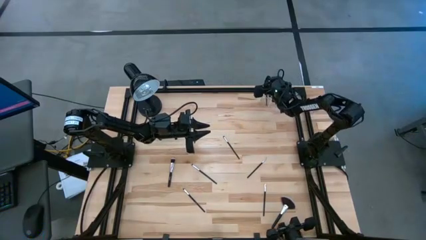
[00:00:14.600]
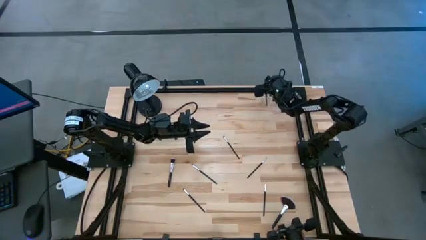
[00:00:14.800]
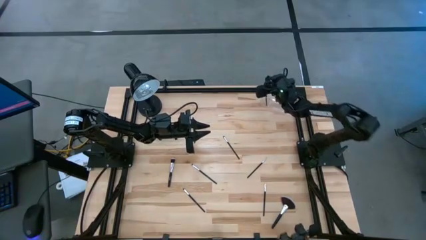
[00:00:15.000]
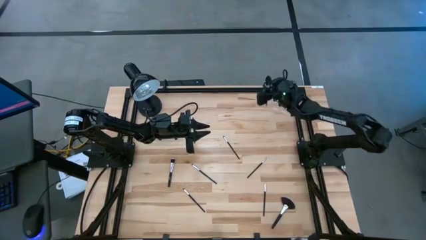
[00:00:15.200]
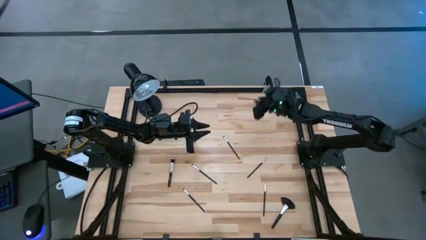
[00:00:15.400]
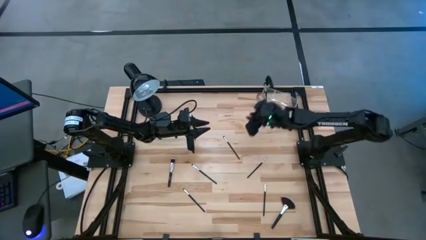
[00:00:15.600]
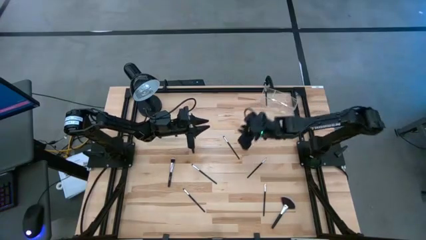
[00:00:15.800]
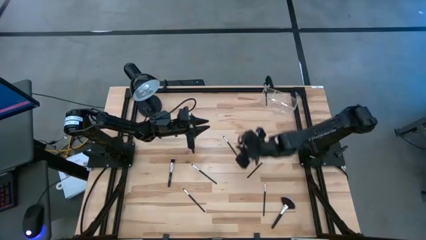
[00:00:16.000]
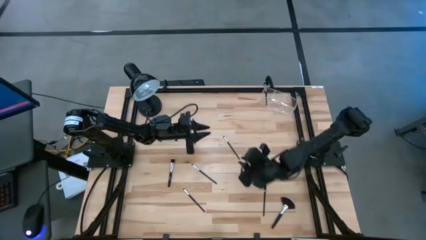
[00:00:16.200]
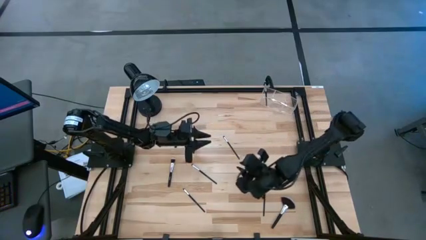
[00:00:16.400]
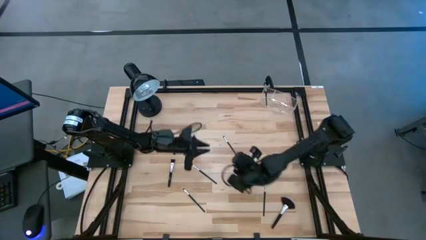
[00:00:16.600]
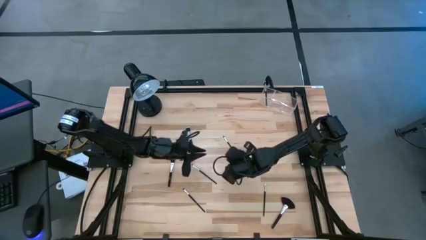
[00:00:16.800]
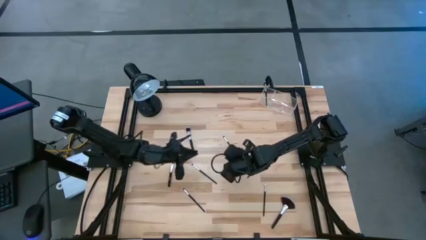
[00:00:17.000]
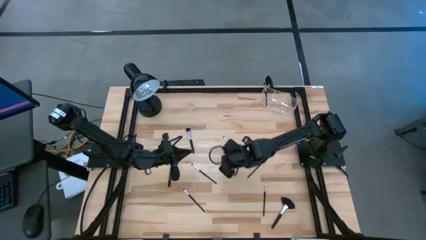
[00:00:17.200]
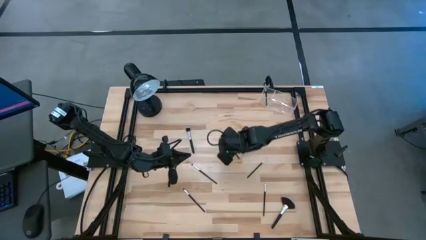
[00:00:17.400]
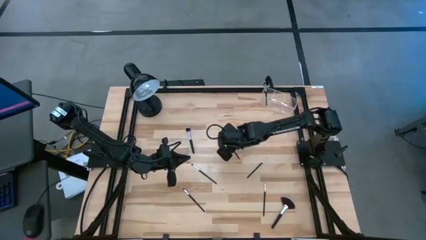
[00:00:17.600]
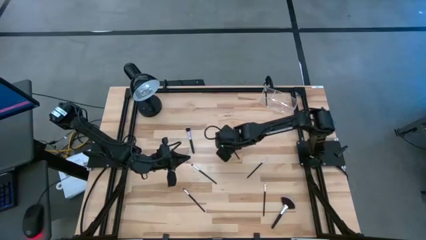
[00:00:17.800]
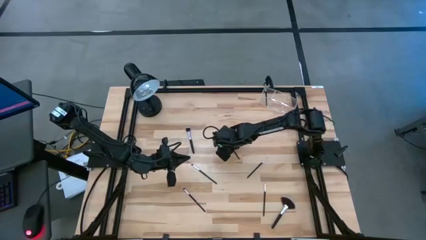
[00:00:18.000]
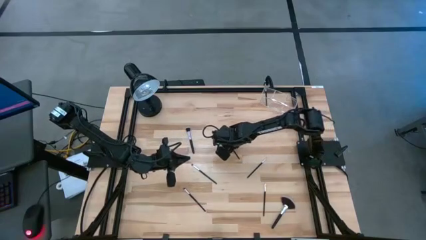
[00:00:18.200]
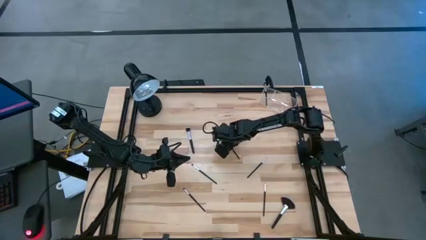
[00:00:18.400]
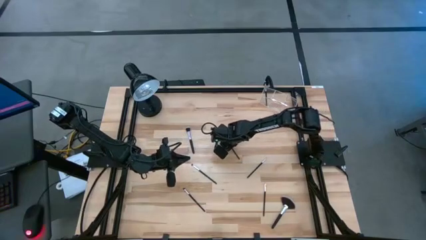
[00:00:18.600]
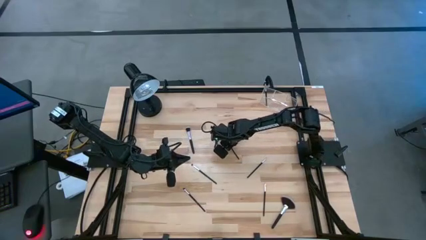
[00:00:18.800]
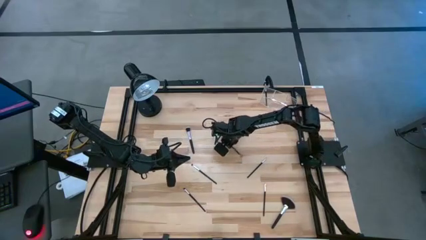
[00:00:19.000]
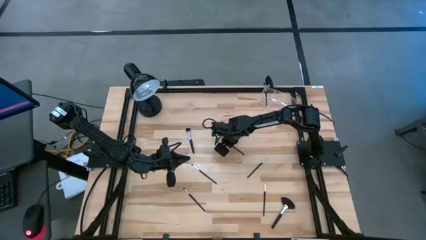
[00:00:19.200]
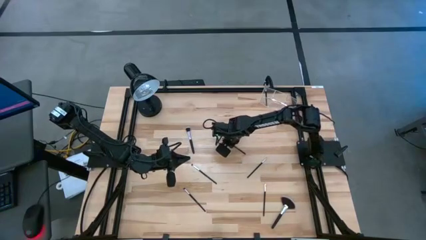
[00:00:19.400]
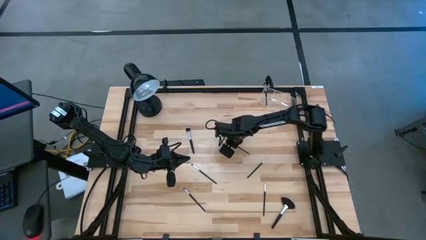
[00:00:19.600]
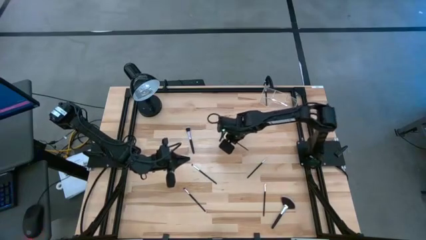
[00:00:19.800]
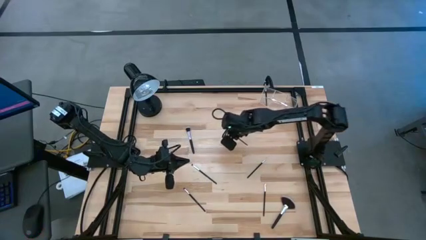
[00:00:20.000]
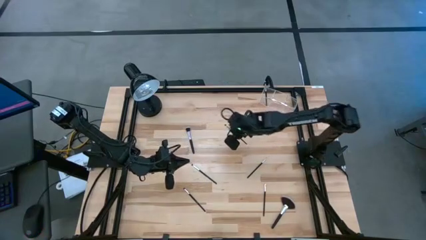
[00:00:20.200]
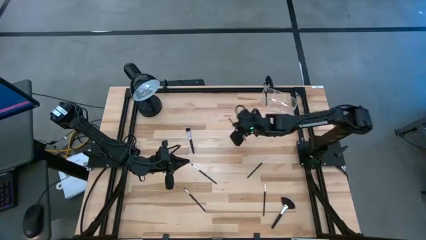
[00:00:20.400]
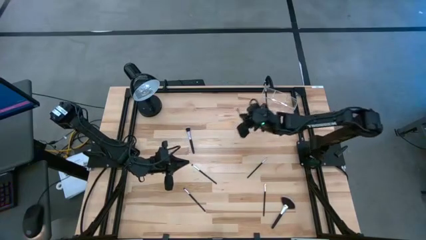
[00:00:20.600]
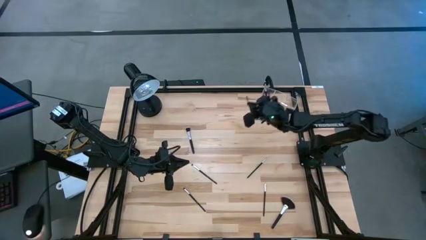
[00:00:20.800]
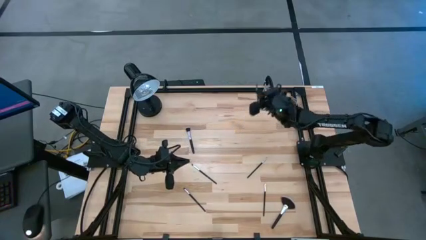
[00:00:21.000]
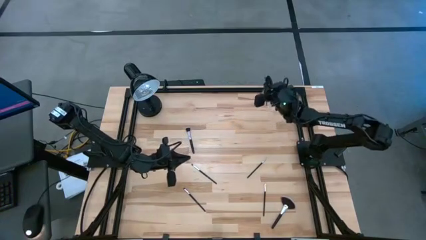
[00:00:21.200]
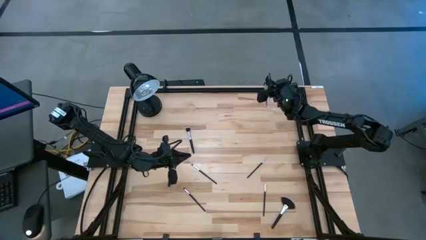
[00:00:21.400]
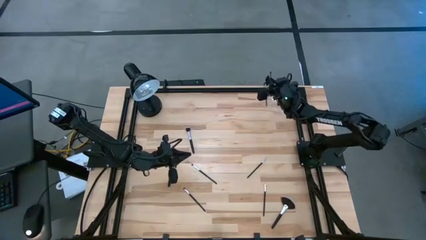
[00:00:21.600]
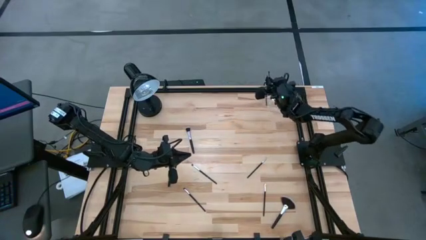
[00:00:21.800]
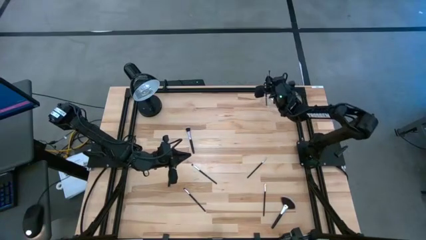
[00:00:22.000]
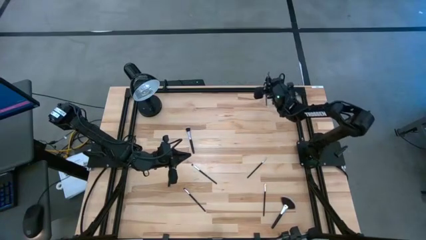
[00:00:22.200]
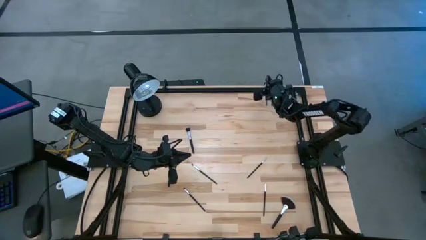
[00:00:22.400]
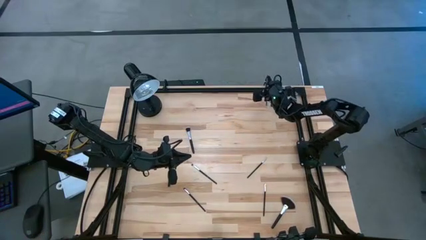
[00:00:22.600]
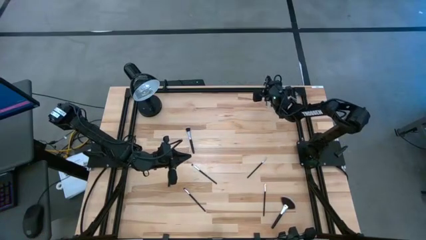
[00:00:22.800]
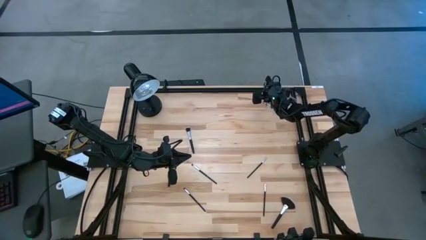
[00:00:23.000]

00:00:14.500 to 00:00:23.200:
Task: Sort items
Put the eyeshadow brush into the transparent organizer

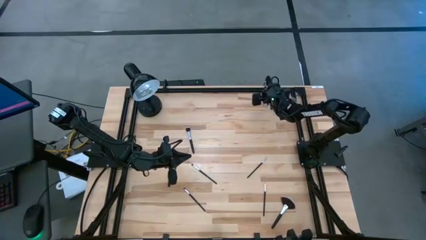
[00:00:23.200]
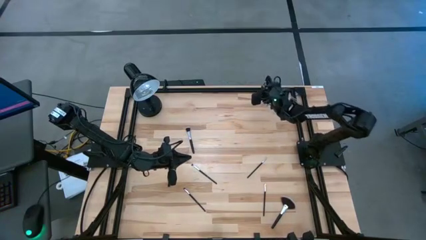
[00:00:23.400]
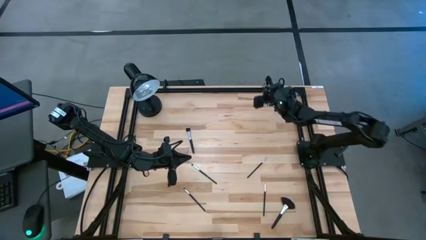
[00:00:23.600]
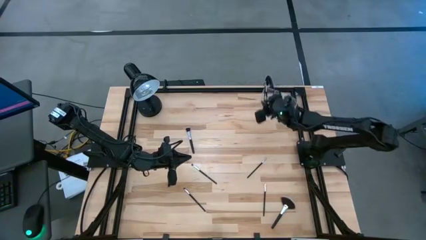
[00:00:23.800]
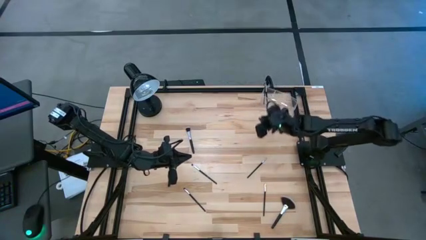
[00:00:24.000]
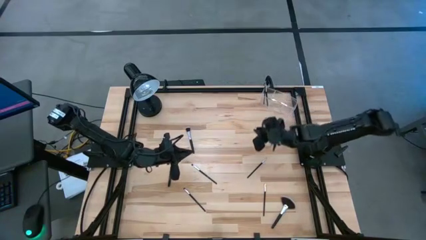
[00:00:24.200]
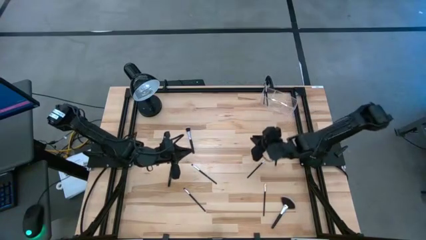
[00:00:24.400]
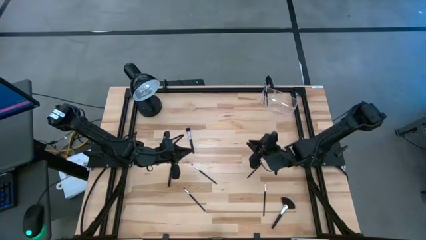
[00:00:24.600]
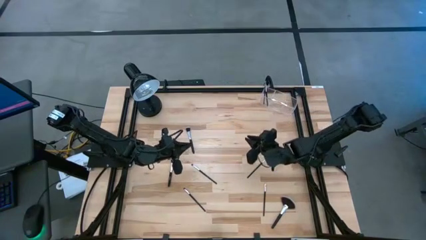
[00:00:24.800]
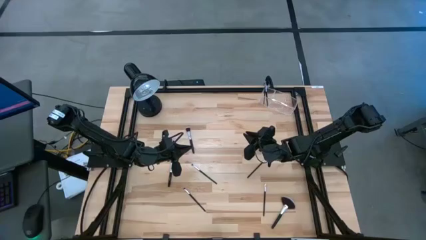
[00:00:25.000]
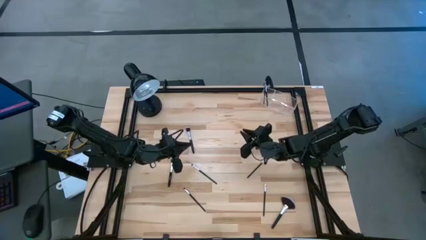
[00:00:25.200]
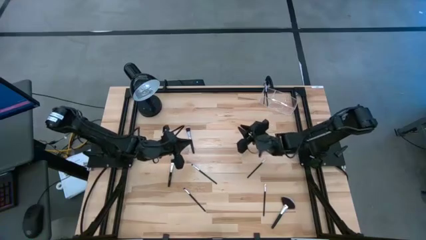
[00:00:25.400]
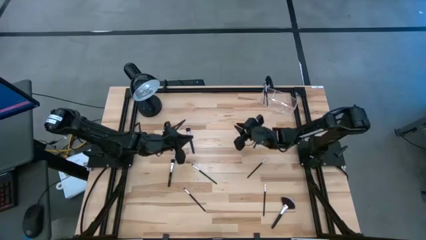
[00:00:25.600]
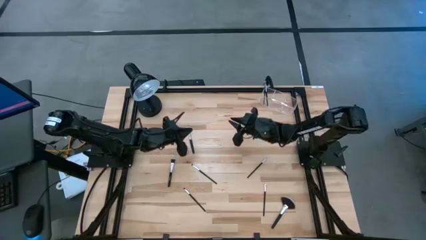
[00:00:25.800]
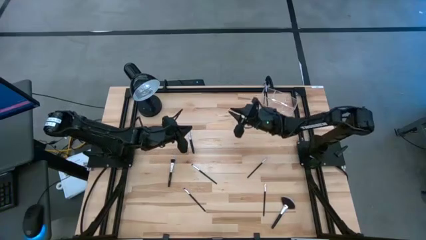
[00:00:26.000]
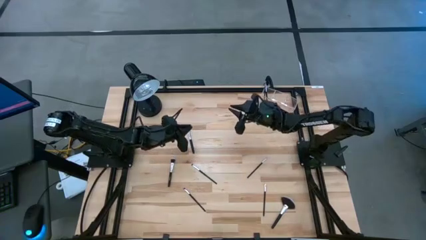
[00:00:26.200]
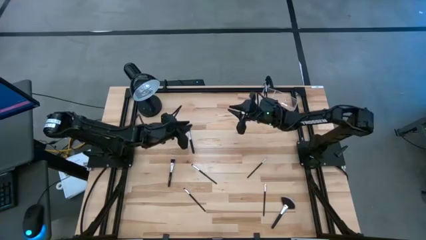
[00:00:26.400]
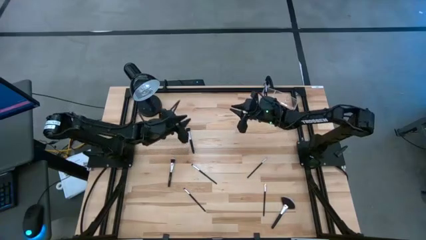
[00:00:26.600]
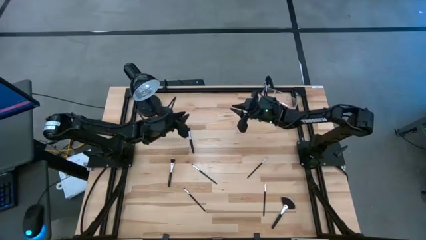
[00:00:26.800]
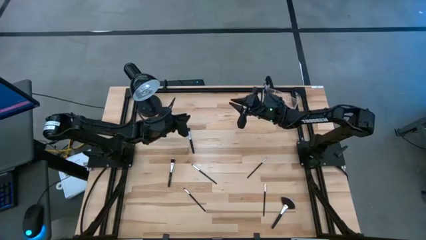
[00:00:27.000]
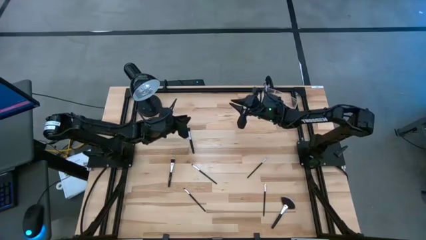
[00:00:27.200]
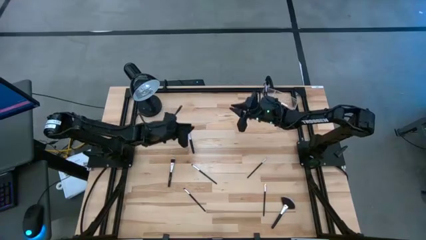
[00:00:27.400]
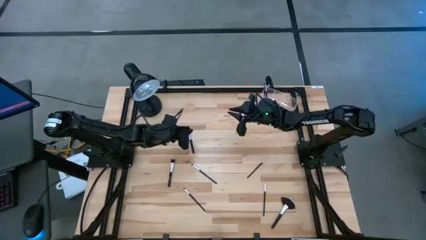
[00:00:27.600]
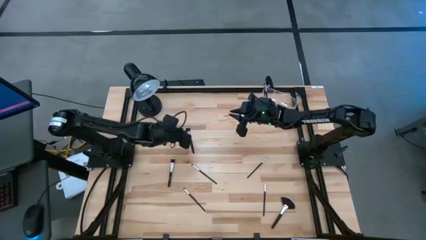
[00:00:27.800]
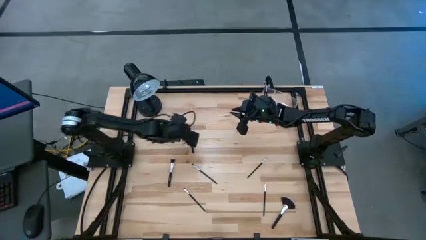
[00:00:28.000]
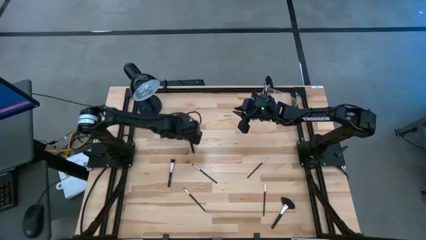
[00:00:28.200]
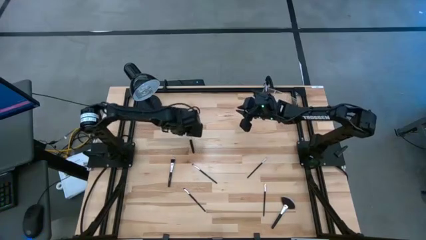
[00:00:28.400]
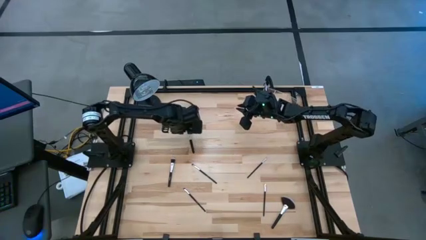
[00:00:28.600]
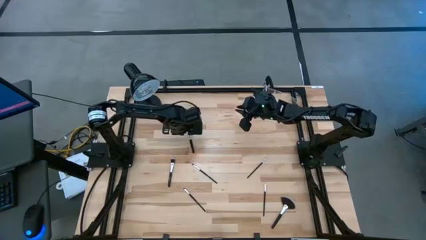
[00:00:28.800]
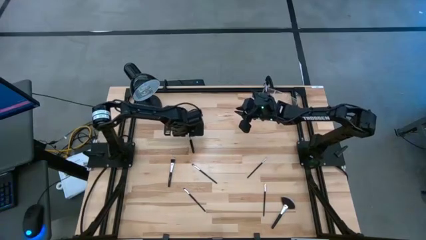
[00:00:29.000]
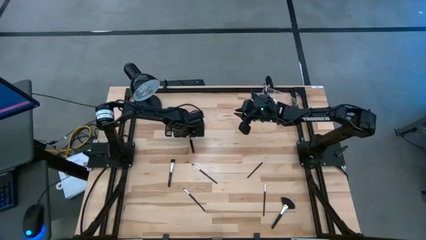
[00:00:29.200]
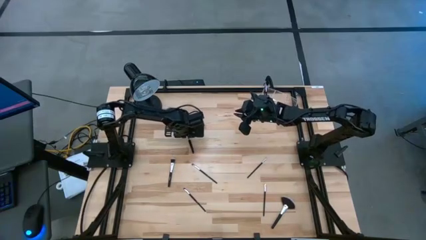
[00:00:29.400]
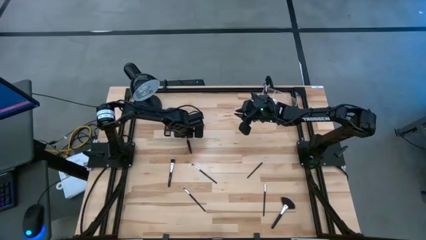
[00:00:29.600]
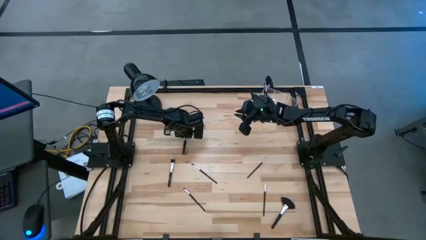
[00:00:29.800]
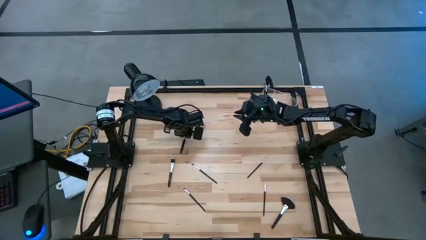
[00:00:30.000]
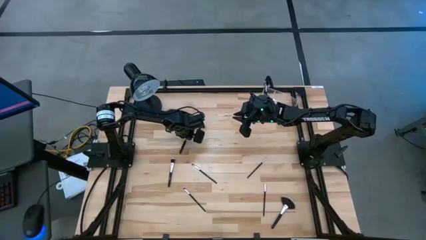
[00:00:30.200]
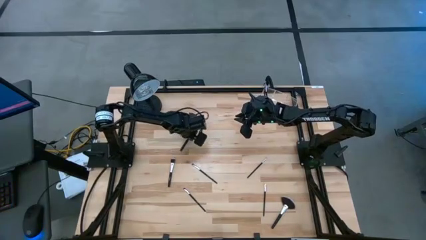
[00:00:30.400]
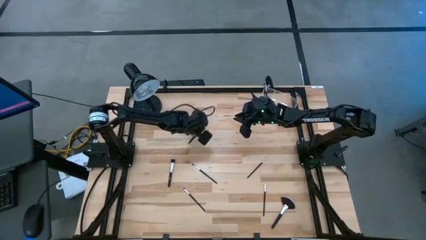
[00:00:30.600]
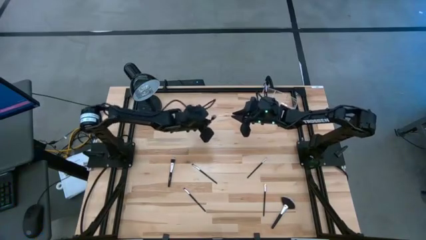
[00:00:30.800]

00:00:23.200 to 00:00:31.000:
Put the powder brush into the transparent organizer
